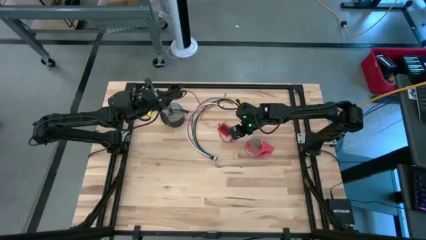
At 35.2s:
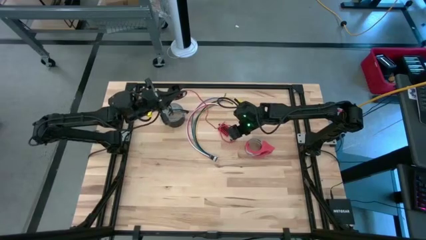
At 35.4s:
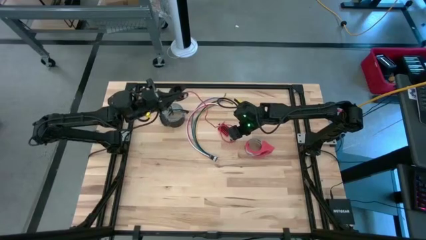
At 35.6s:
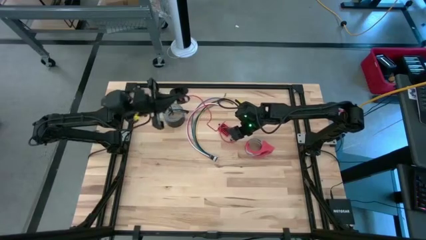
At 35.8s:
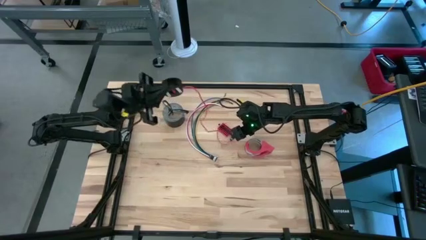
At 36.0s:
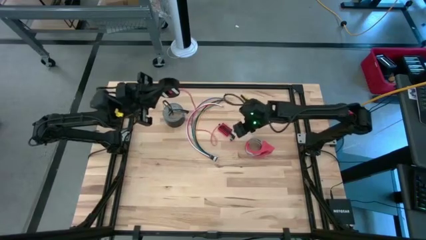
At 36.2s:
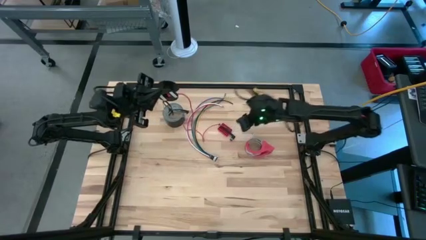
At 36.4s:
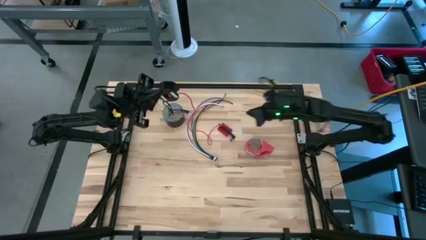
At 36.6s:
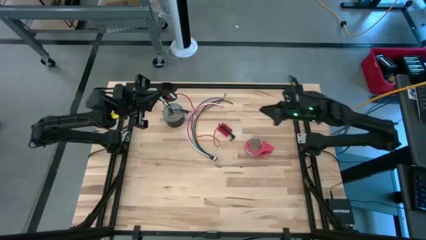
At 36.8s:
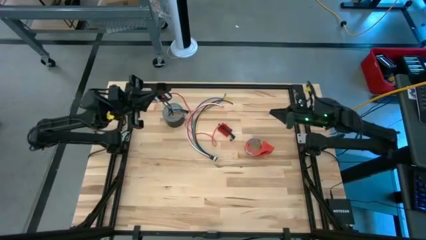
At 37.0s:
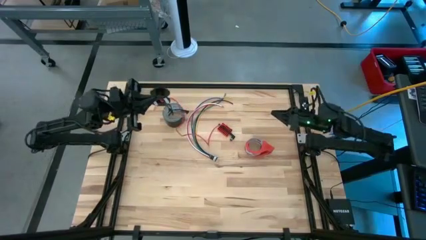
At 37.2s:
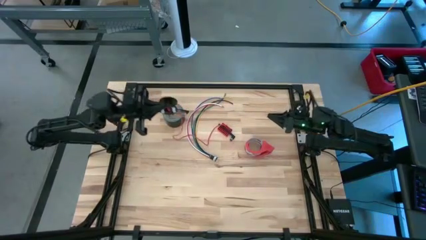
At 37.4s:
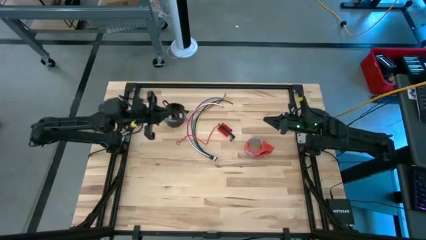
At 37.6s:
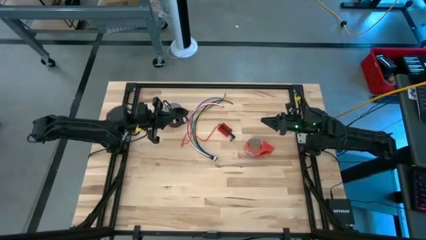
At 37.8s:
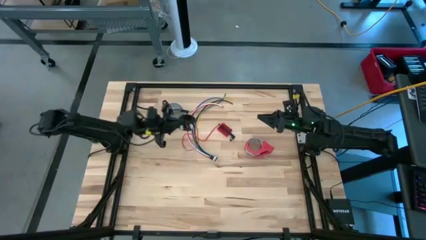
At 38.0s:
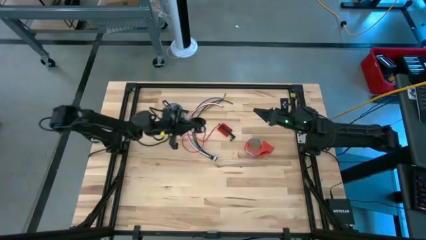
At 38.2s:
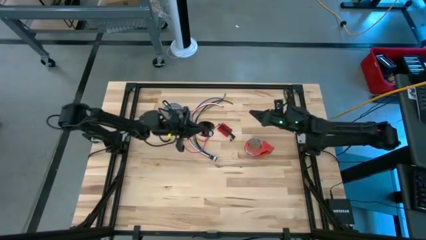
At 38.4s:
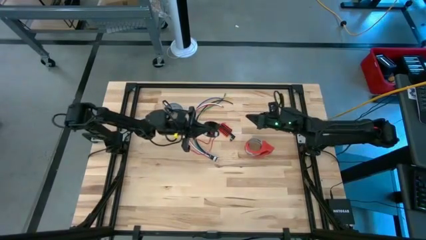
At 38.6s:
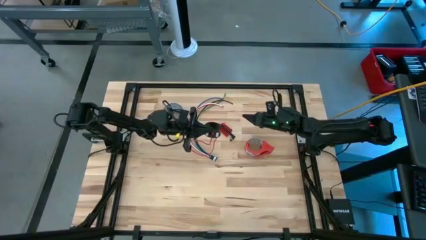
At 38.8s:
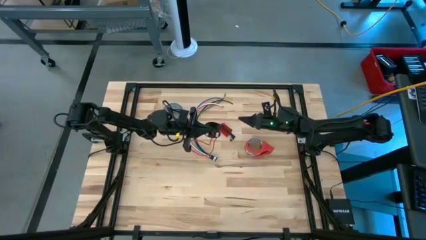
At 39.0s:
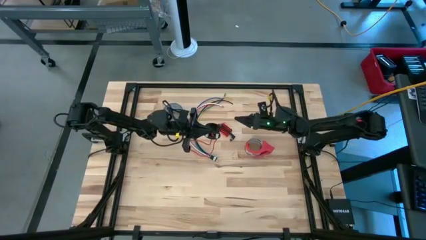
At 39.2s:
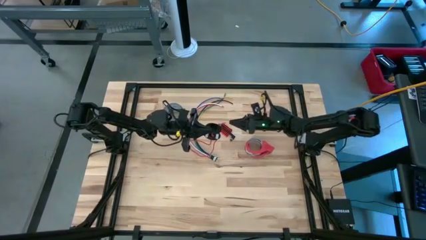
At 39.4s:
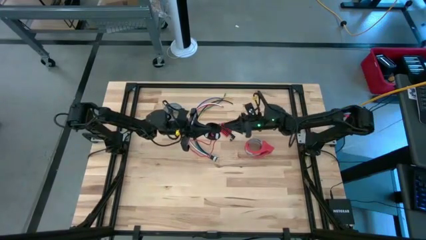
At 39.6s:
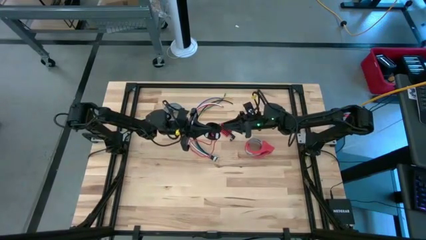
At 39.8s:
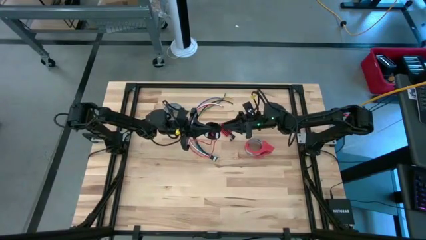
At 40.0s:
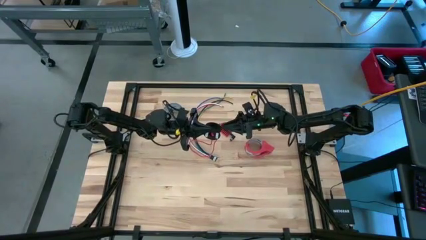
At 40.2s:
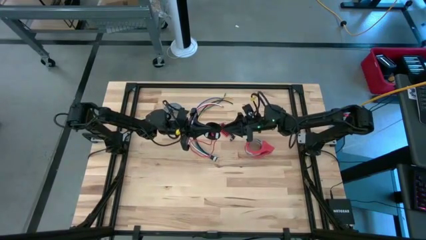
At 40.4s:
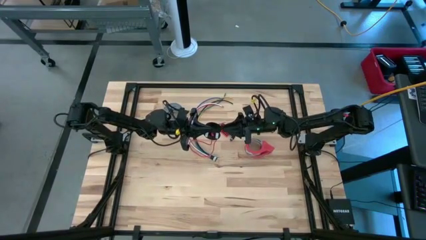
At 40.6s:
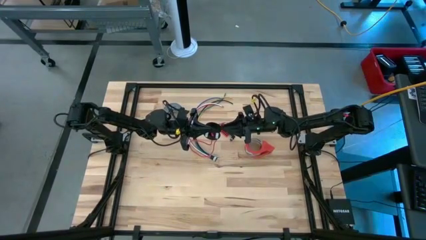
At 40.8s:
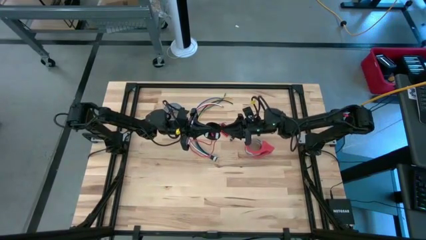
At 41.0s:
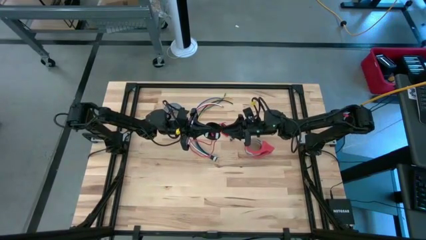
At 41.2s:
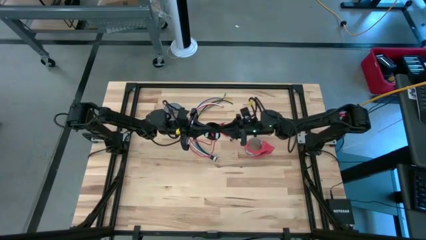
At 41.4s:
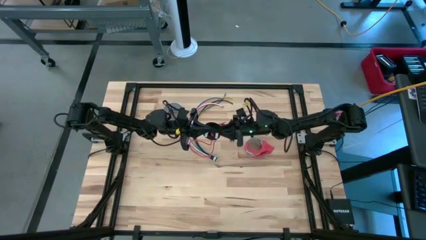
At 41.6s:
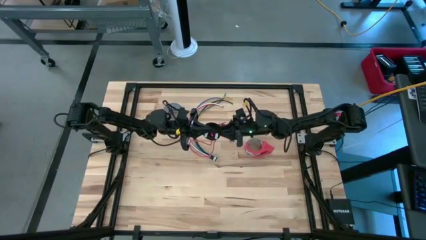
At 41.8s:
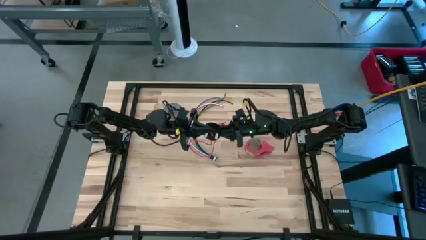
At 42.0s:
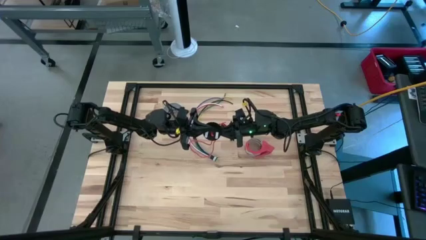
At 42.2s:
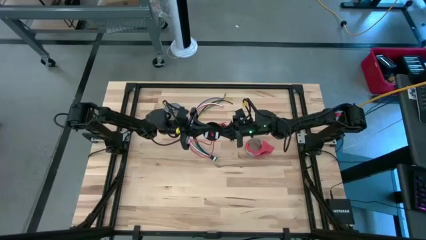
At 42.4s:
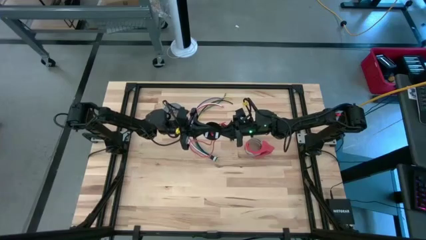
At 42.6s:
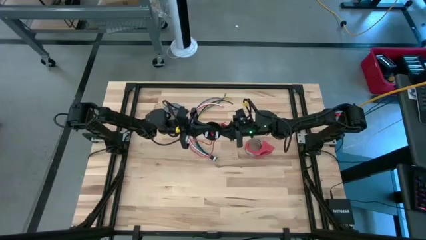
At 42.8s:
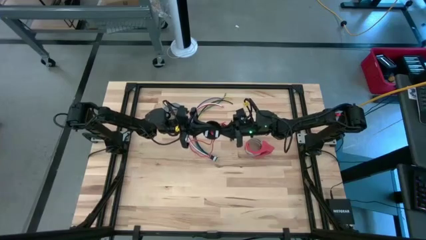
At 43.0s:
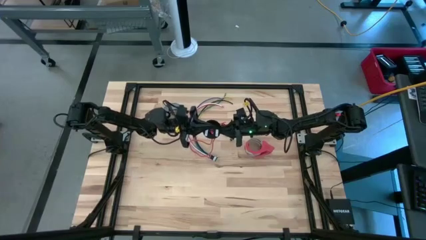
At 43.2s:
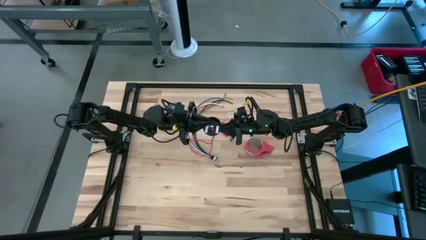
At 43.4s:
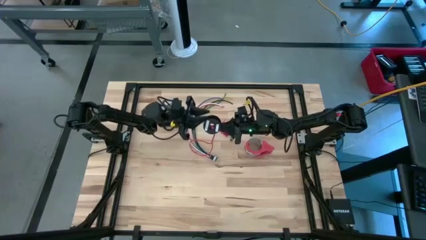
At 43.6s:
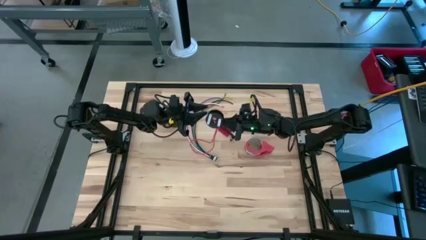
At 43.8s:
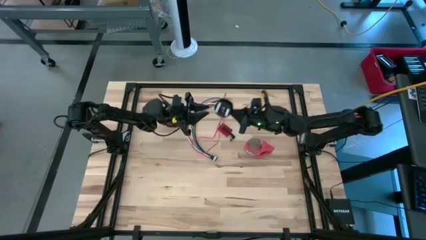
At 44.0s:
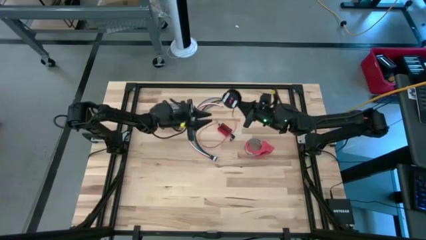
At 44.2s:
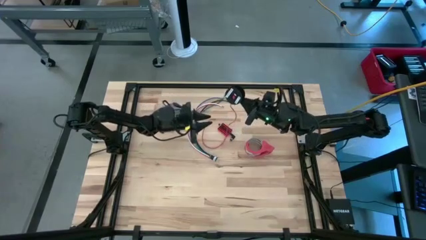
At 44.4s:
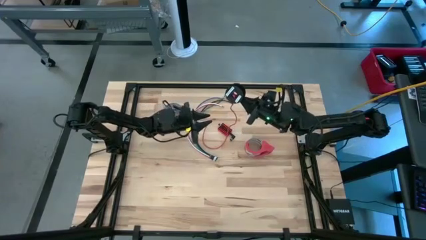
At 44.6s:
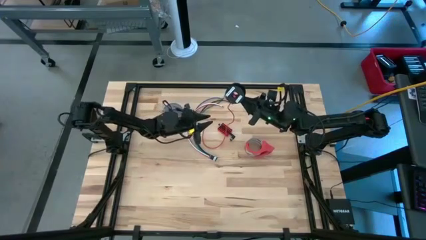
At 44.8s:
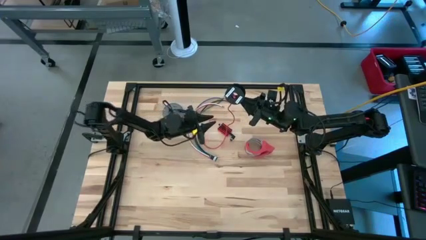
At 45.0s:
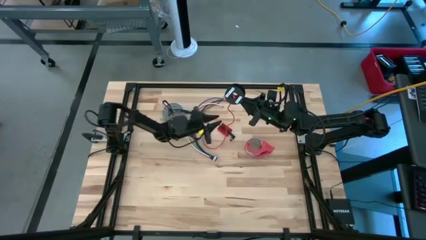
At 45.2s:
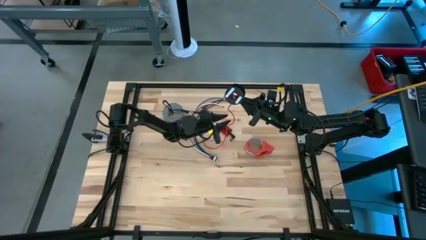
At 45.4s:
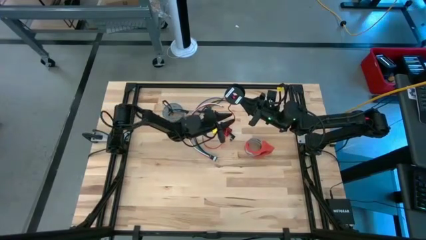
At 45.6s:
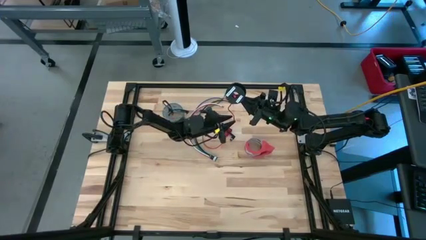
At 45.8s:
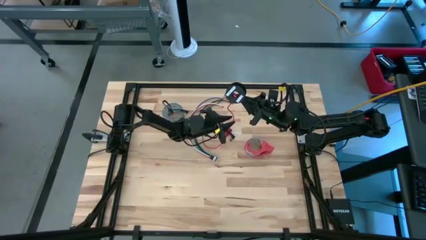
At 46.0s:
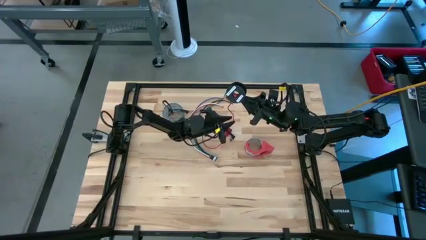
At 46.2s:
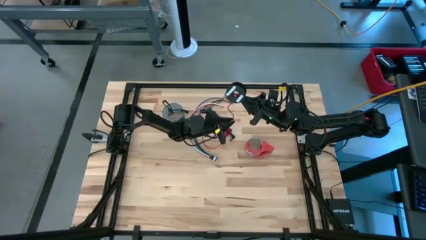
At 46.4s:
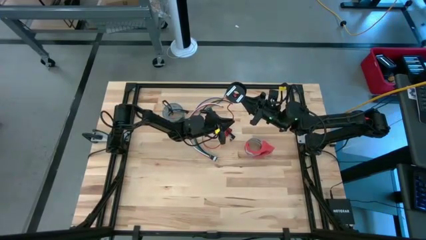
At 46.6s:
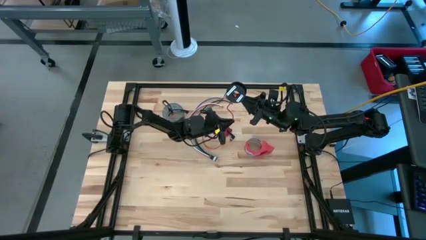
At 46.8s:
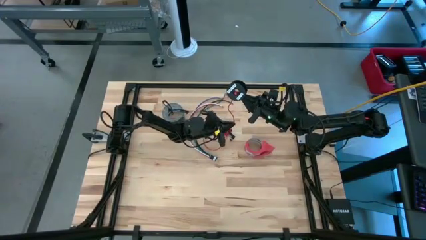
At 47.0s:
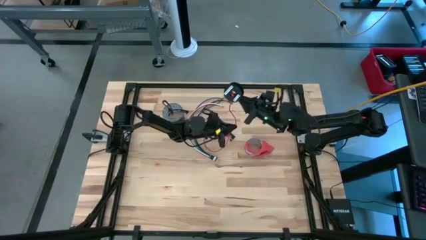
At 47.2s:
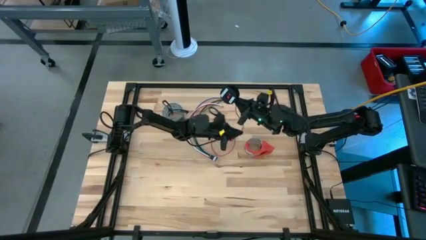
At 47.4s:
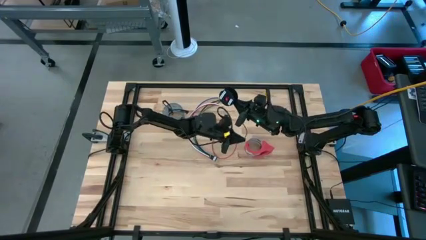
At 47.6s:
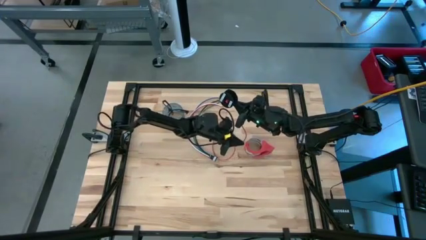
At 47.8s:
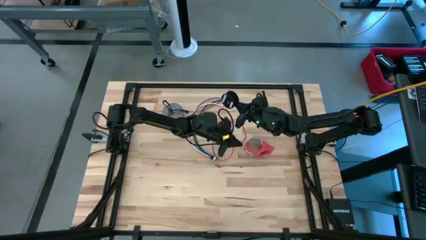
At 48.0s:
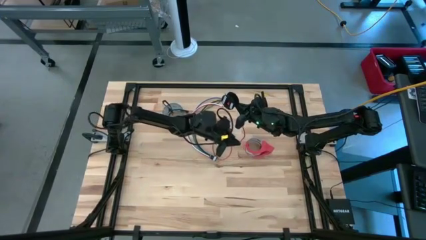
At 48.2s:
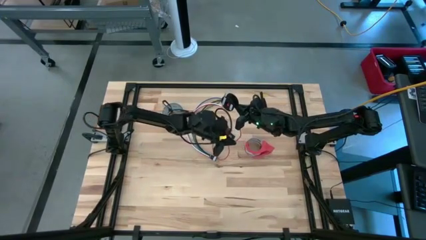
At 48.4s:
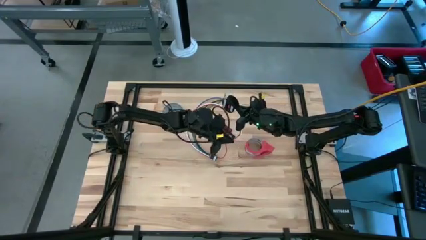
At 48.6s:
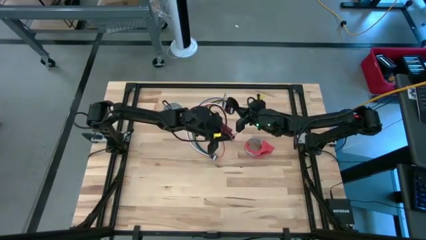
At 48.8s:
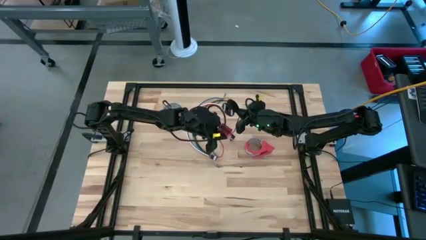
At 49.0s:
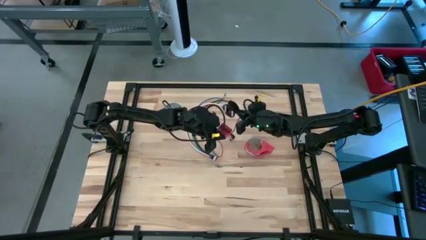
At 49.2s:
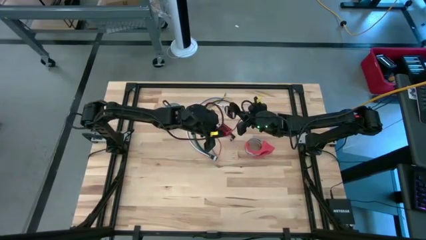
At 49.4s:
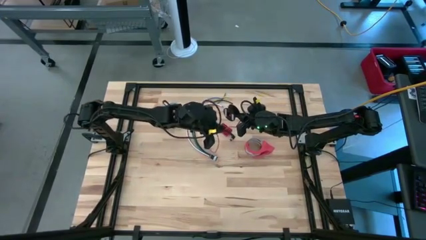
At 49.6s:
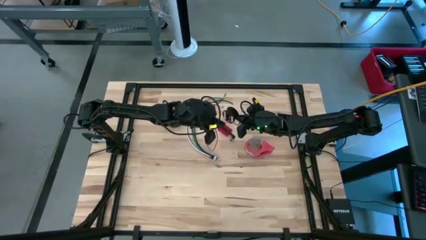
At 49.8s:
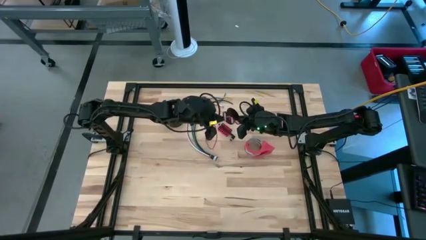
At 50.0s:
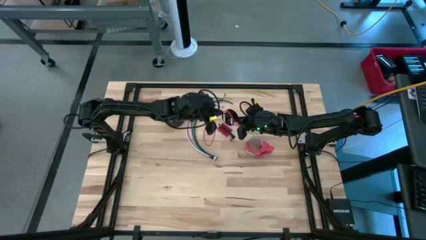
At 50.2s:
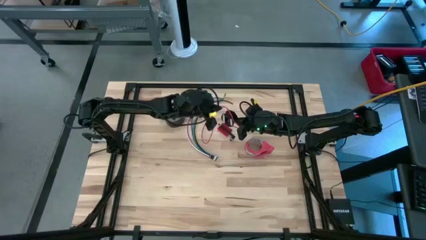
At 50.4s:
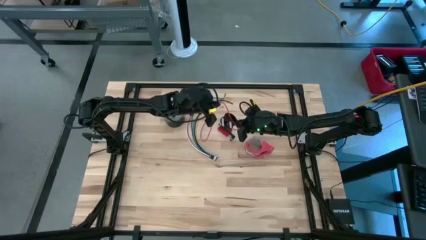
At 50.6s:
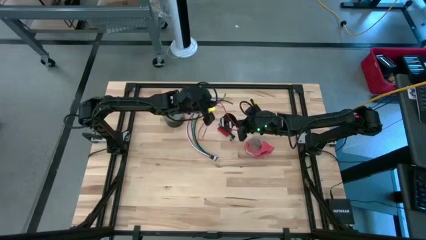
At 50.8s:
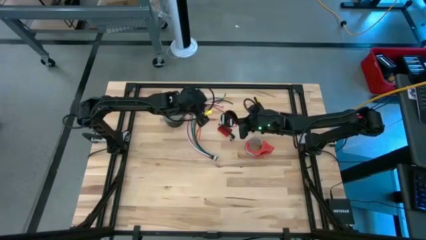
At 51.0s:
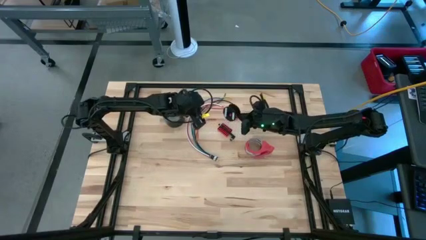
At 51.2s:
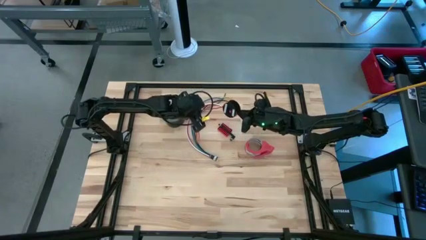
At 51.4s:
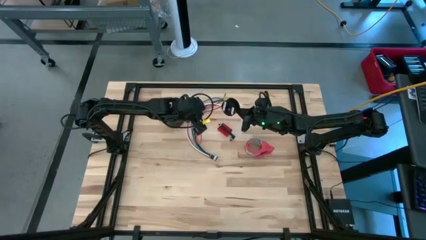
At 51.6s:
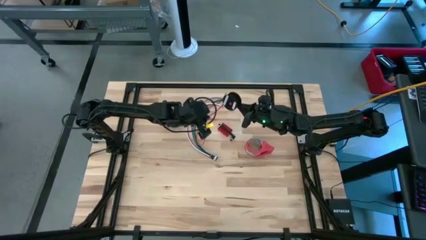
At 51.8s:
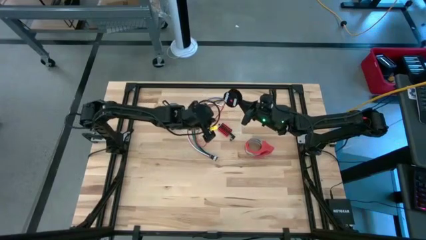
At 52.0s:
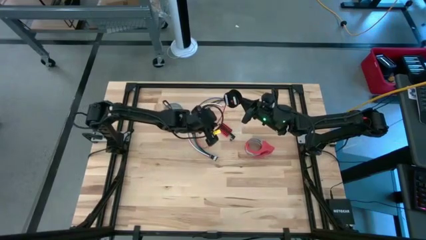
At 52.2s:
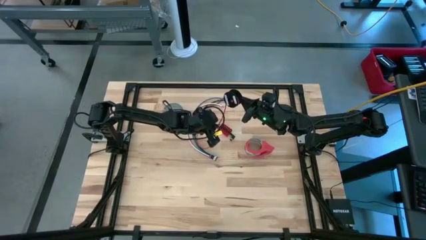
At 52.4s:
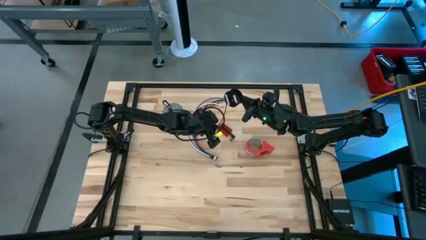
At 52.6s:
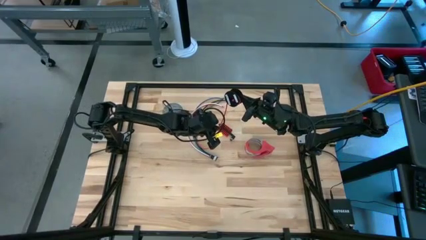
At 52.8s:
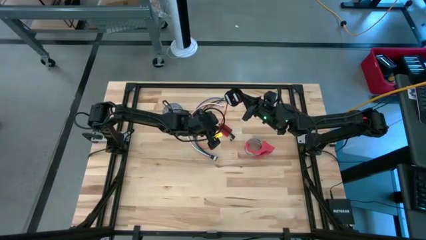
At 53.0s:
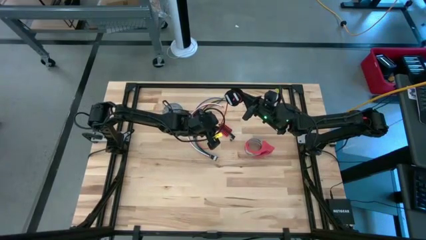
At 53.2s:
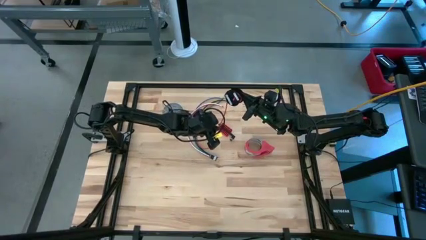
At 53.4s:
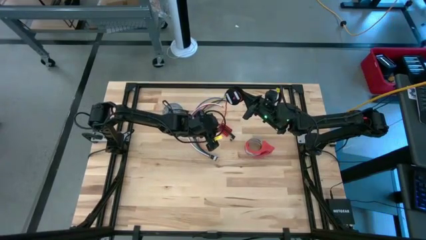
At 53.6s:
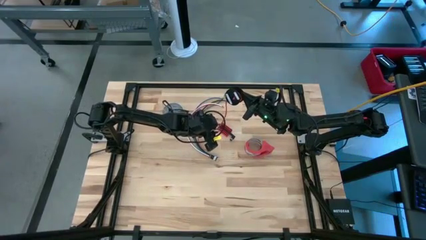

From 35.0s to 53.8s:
Task: Coil cords
Coil the red wire onto the spool
